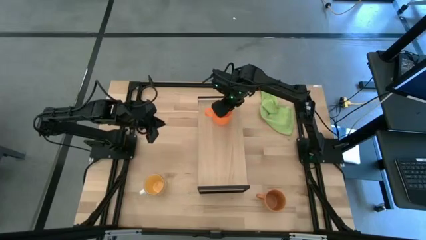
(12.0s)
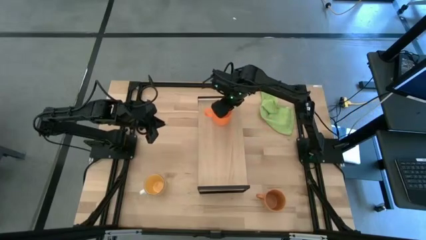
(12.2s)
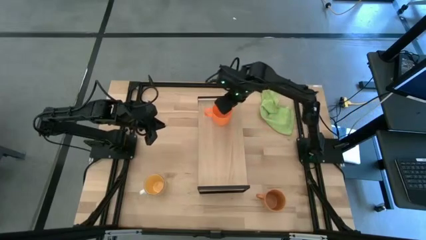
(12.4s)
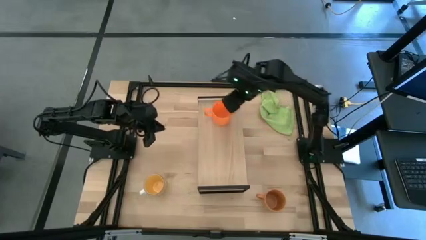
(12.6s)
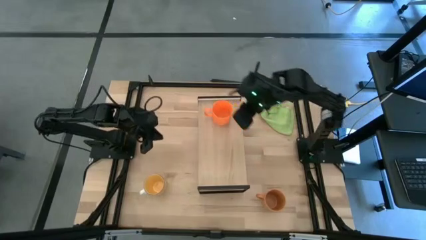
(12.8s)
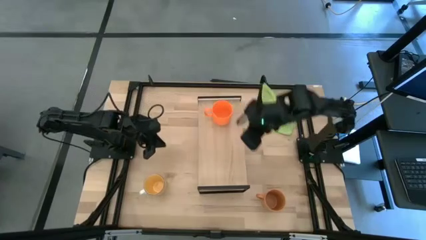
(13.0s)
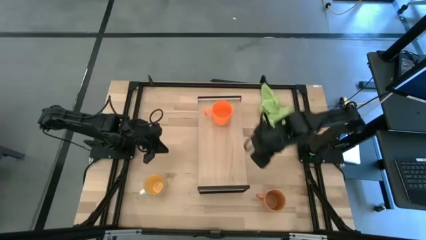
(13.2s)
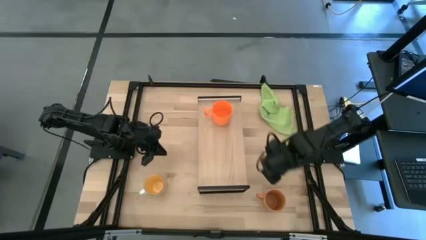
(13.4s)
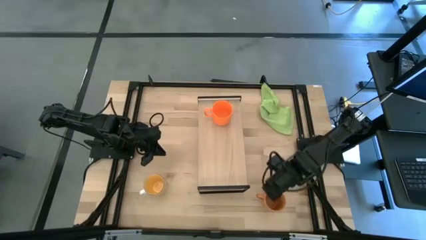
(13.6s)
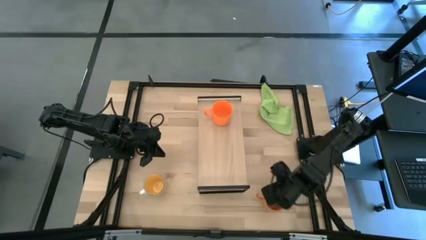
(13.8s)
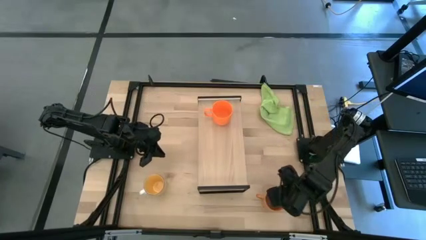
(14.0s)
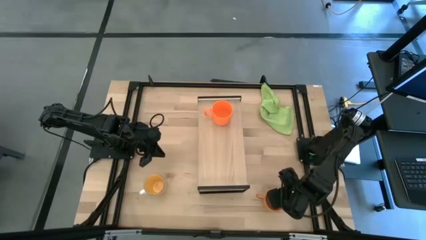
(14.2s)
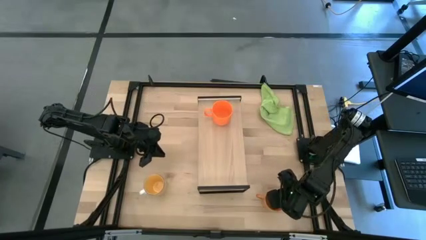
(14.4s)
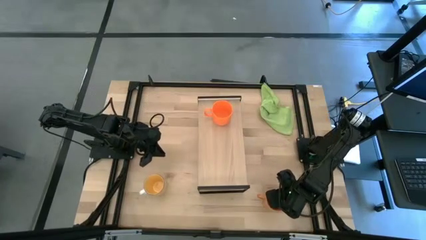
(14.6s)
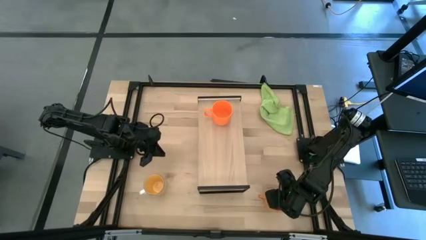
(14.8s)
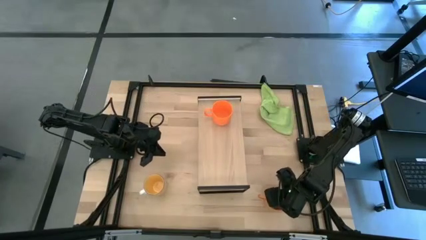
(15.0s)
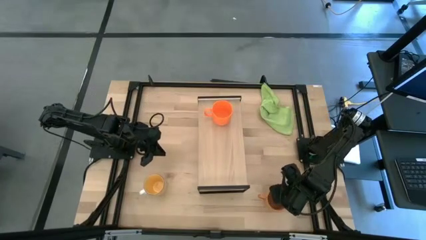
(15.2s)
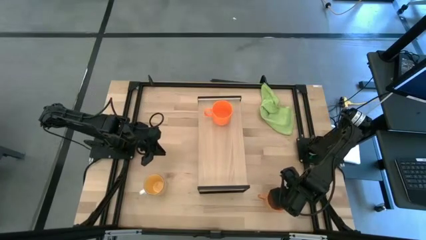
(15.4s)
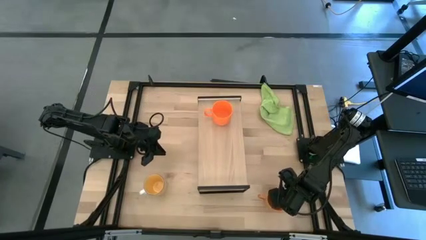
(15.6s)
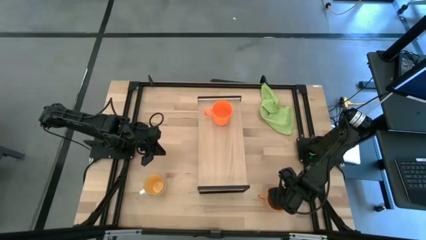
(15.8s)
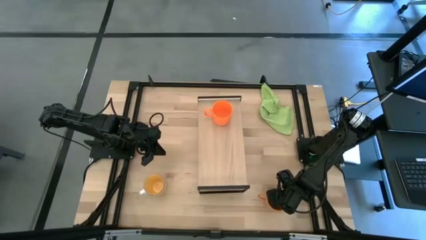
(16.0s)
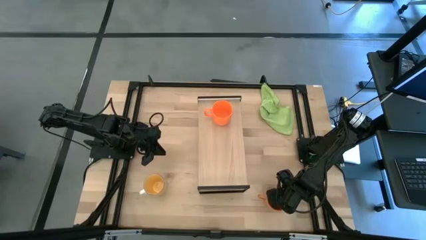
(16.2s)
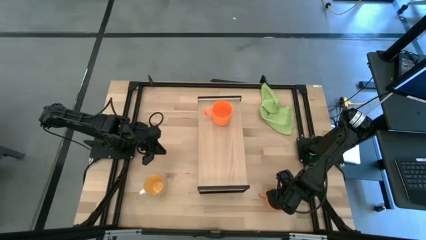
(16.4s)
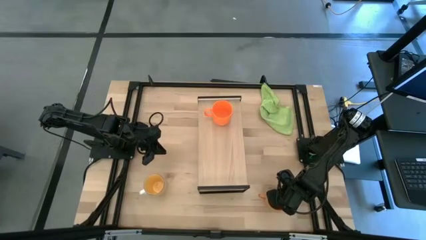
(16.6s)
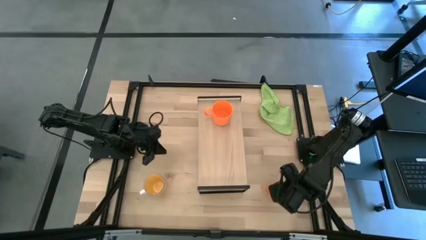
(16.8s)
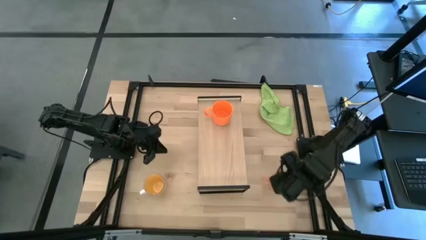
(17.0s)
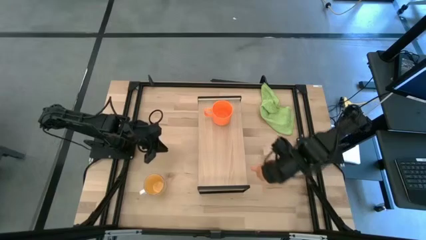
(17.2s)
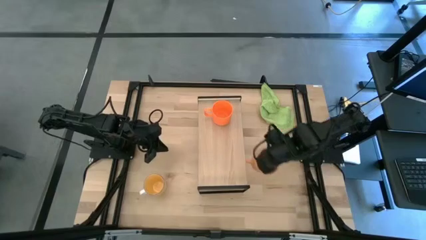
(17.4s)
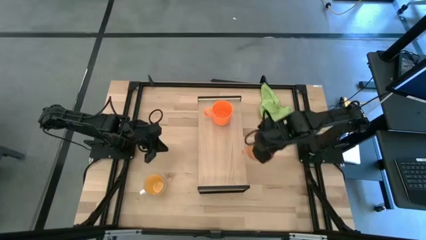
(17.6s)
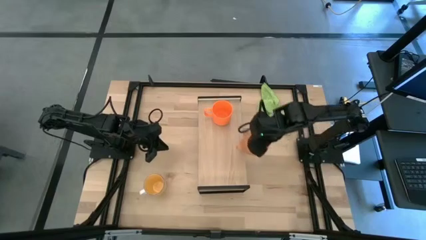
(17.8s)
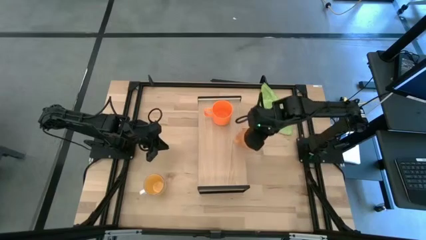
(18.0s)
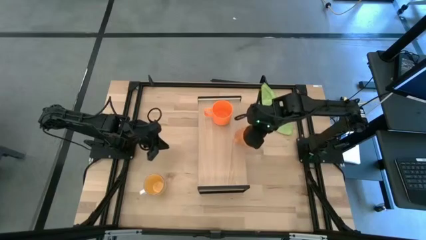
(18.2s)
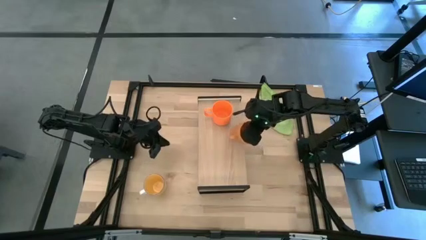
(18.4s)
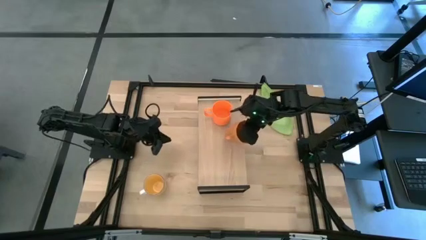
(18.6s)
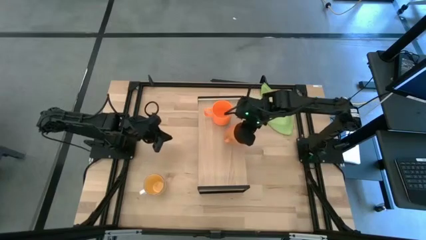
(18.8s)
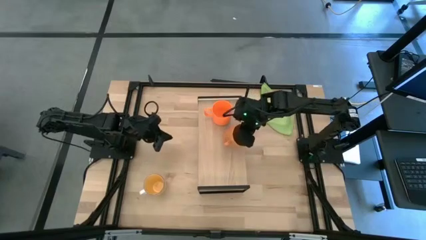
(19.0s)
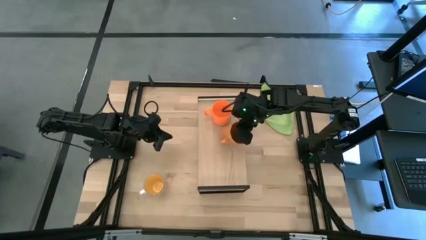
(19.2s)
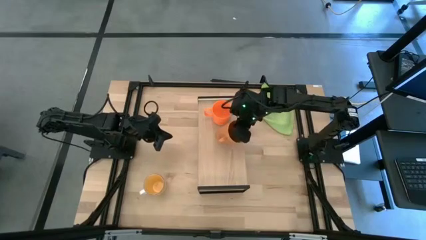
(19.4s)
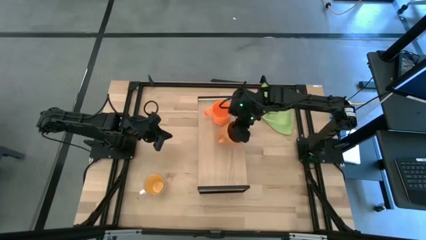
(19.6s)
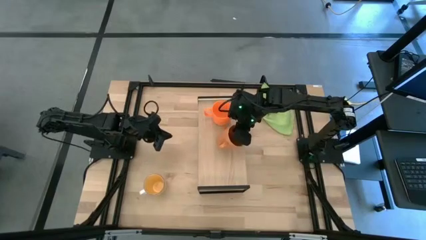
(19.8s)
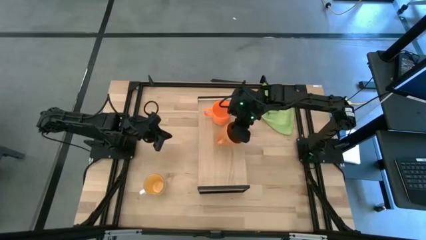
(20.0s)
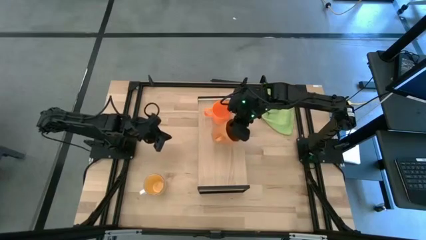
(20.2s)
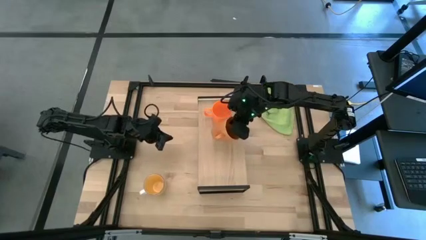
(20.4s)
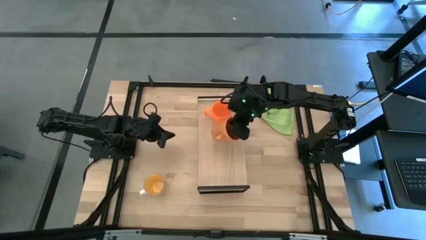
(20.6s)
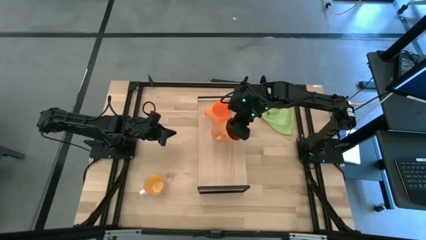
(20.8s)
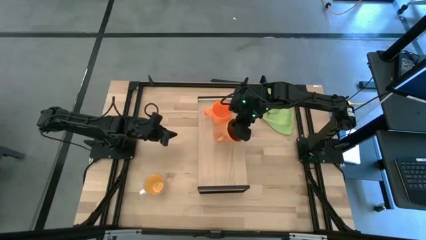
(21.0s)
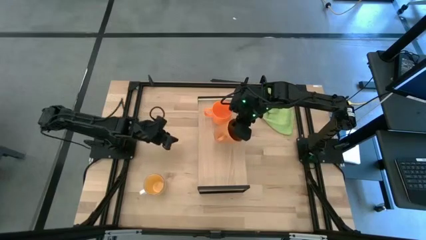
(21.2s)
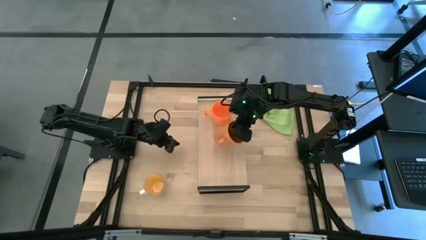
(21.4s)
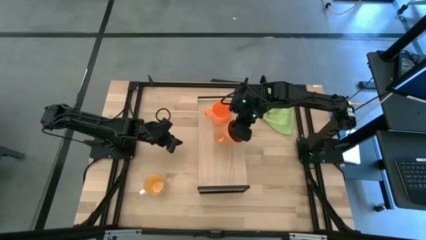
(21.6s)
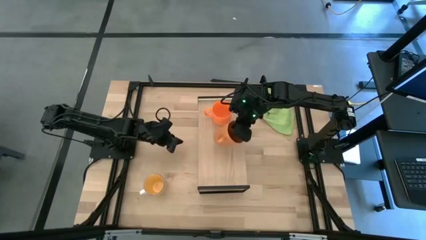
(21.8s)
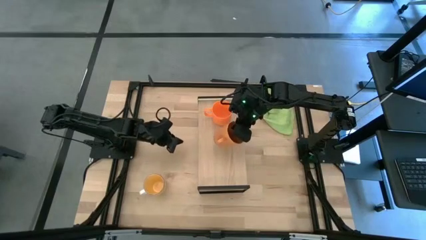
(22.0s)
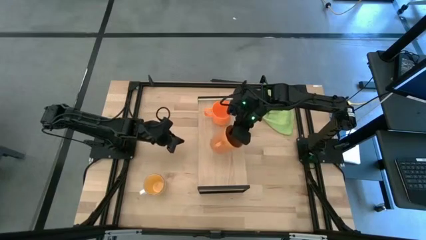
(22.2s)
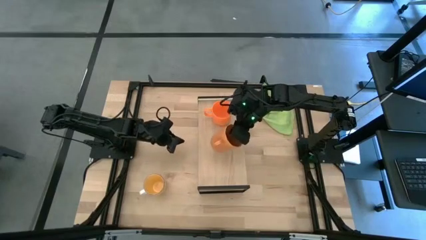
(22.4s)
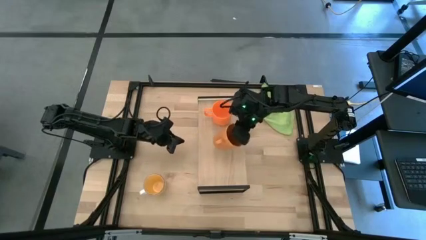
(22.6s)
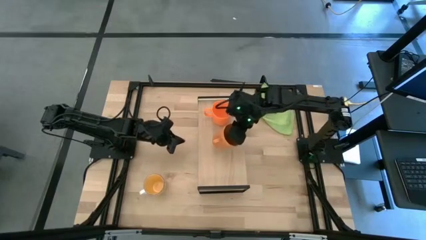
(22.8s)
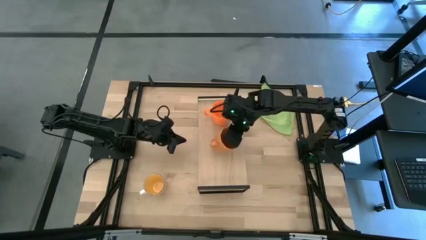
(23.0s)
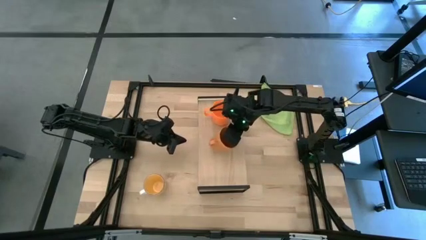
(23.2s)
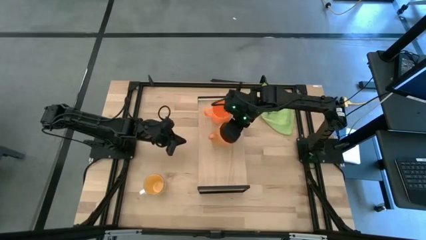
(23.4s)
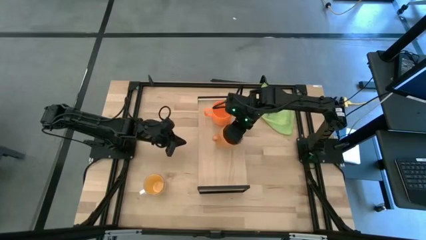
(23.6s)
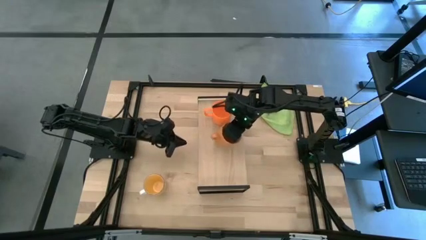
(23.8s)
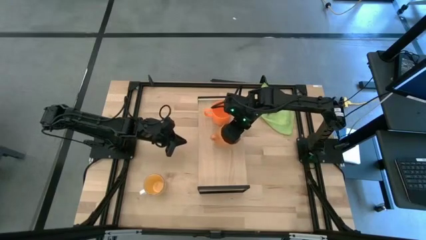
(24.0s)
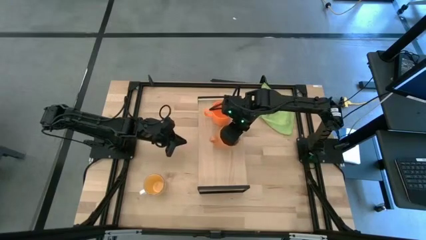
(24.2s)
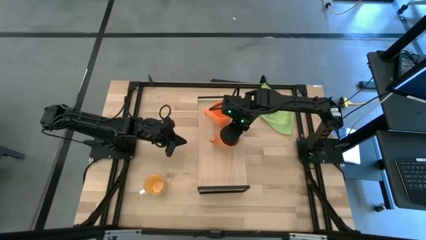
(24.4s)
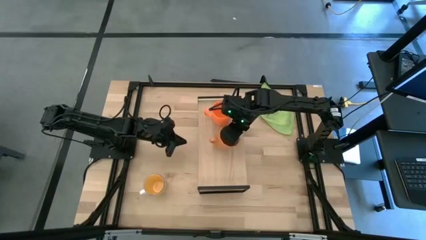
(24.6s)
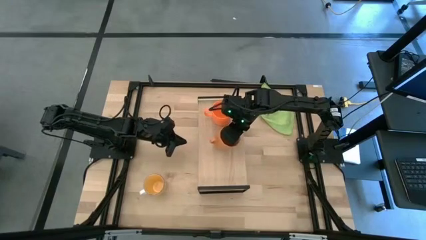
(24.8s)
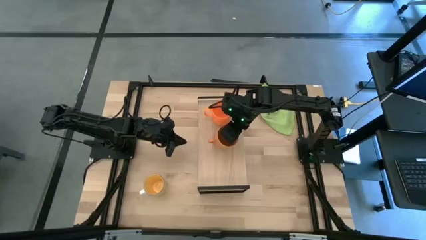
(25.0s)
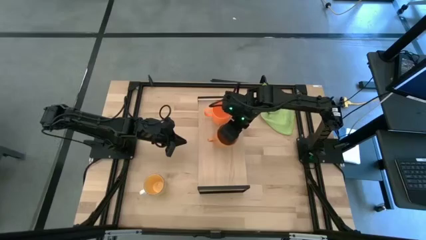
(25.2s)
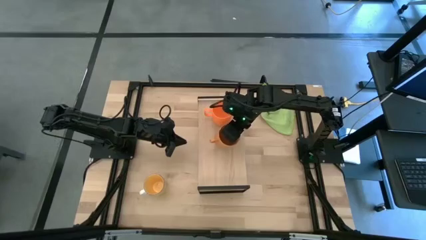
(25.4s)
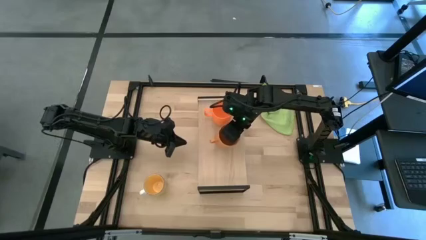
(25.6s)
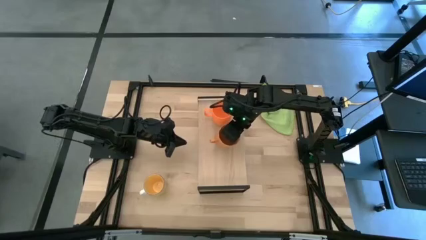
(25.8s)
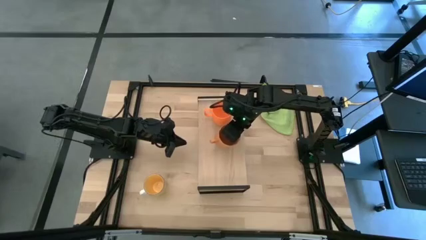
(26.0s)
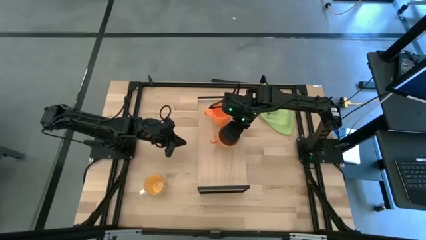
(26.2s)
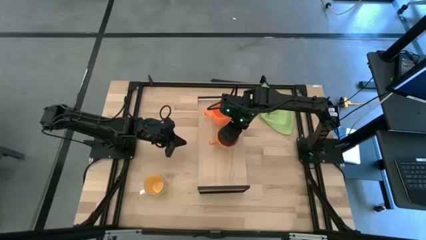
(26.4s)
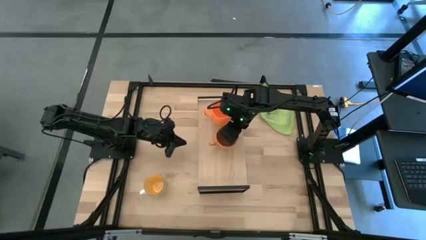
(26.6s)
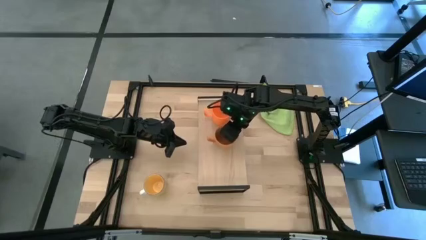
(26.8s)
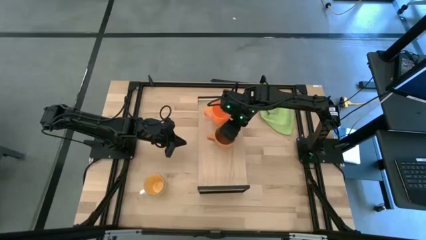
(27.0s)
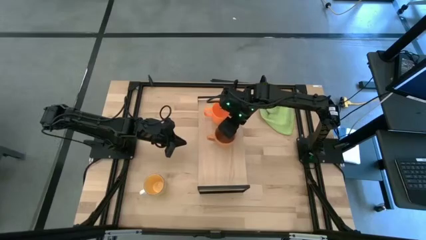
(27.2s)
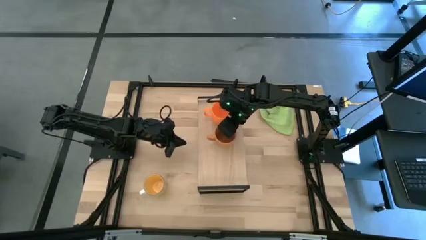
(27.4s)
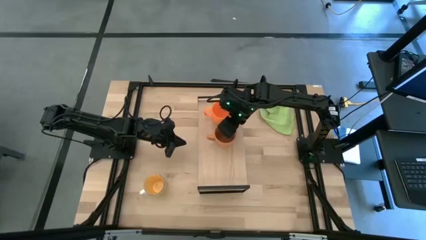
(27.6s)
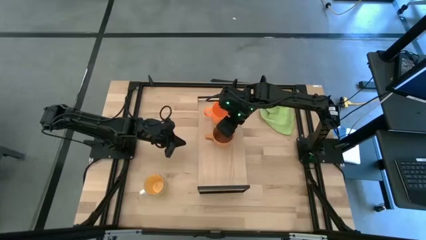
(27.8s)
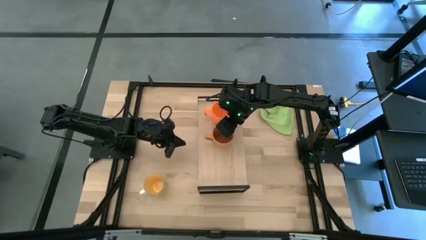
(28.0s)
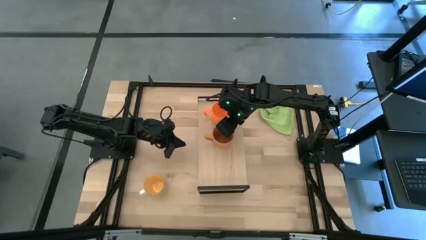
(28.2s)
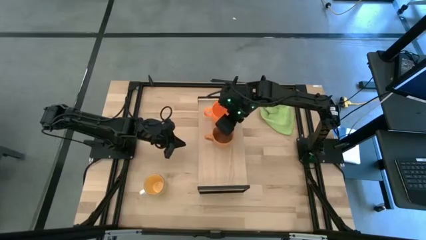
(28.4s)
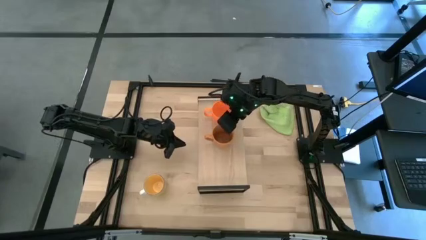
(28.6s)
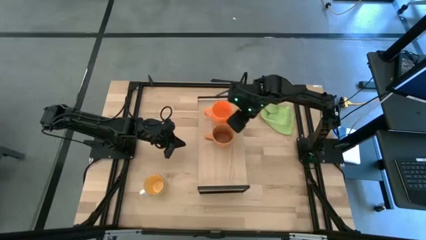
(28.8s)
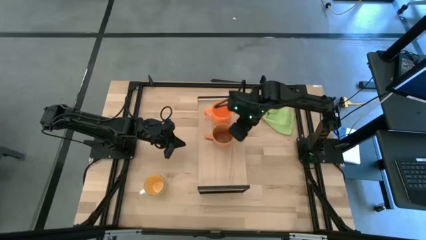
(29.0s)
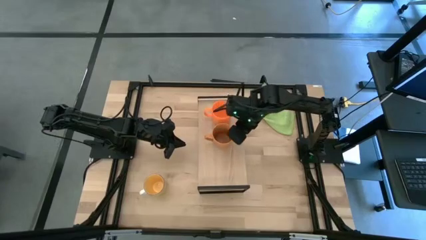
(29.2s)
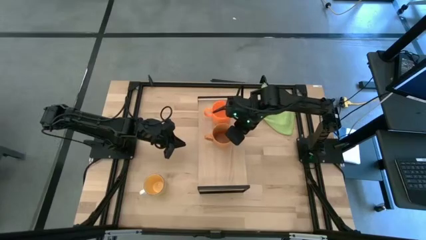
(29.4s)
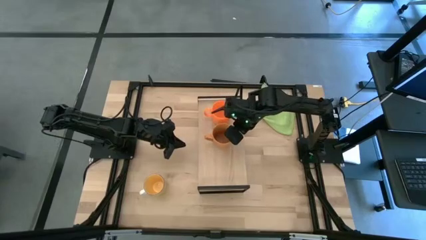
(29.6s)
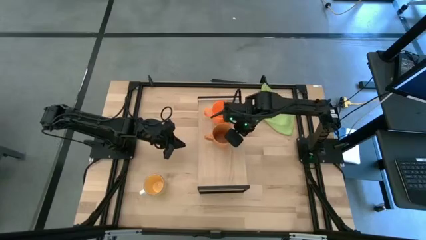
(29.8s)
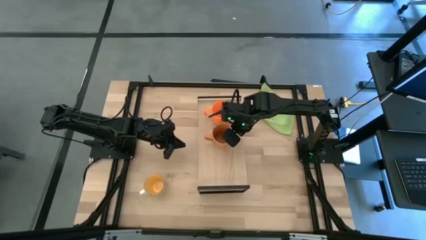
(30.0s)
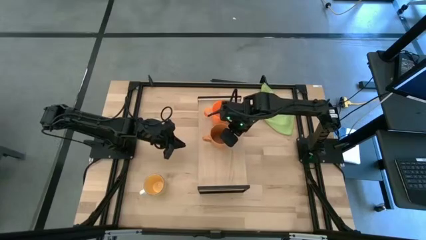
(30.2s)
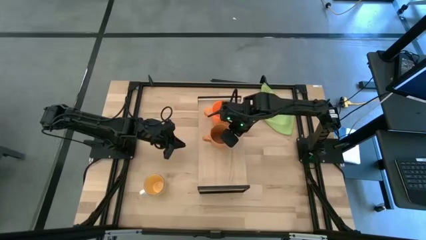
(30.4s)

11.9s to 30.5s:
Task: Stack small to large cups/mugs on shelf
Put the brown mug on the shelf
